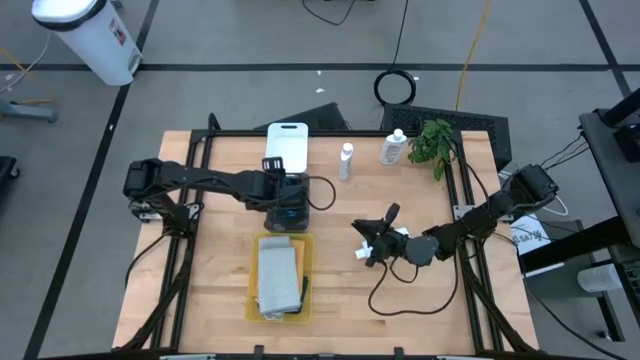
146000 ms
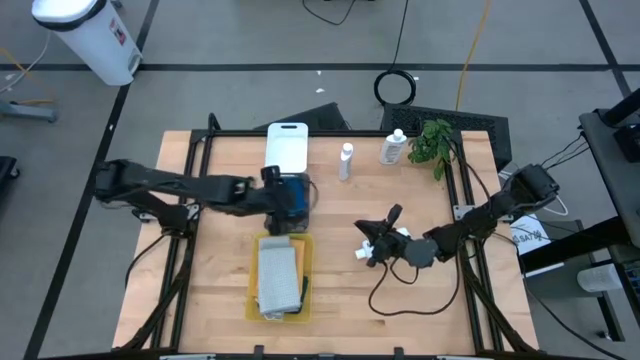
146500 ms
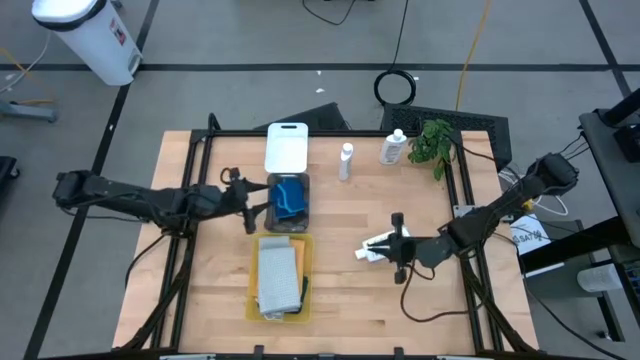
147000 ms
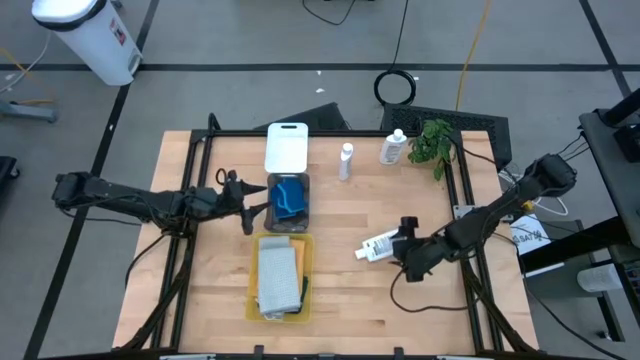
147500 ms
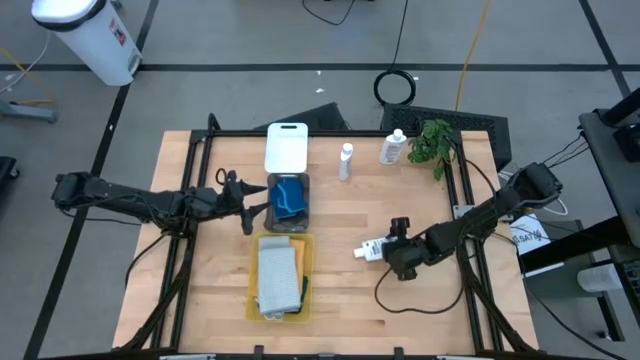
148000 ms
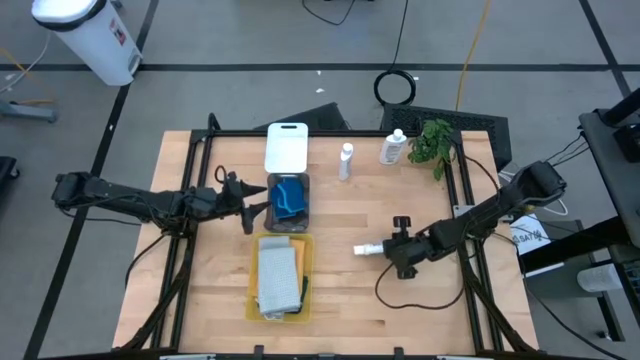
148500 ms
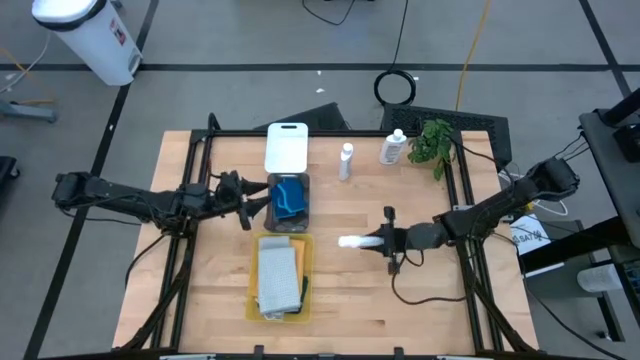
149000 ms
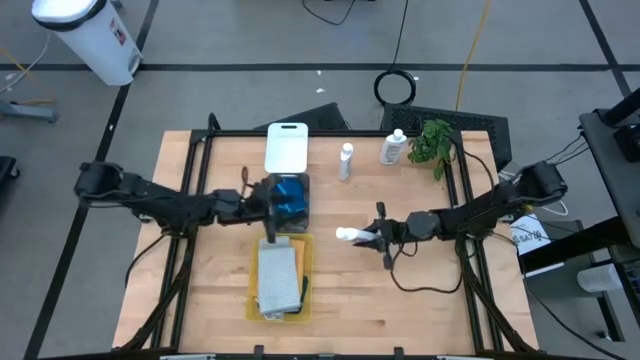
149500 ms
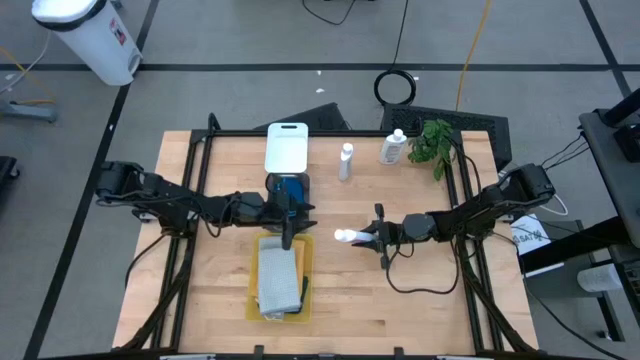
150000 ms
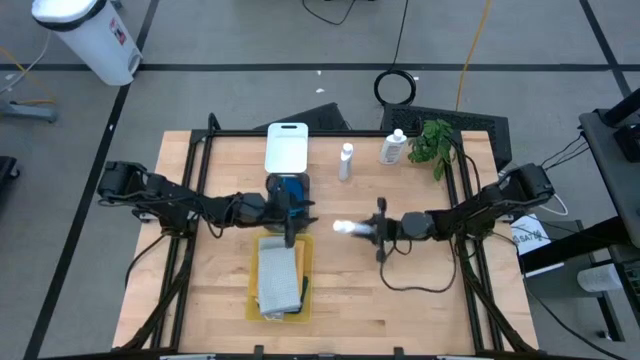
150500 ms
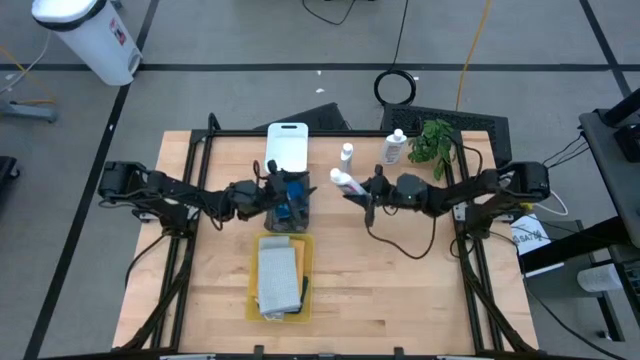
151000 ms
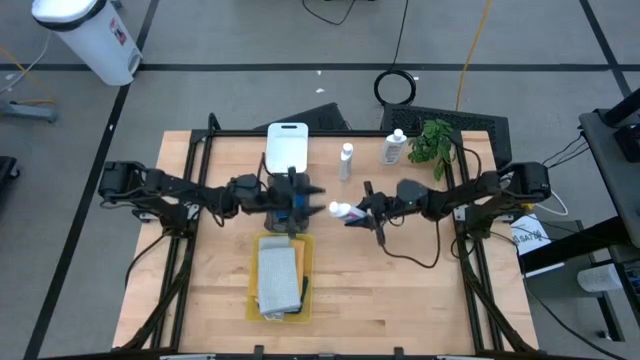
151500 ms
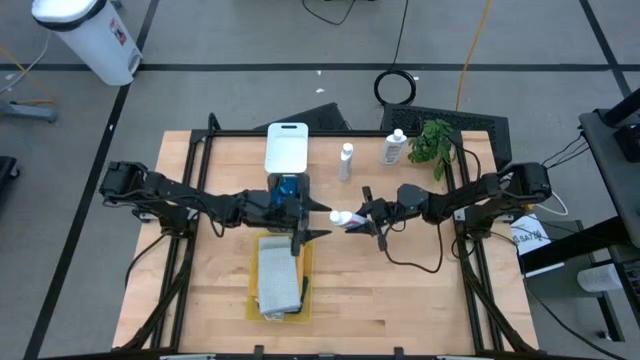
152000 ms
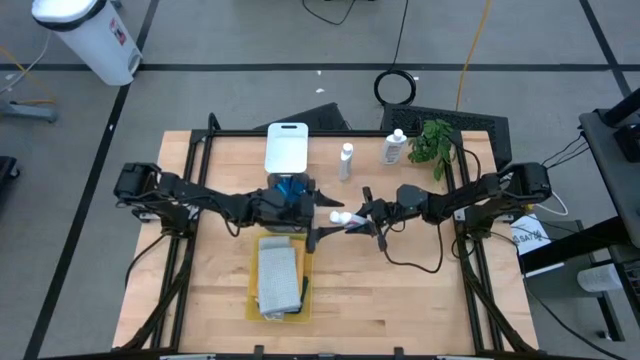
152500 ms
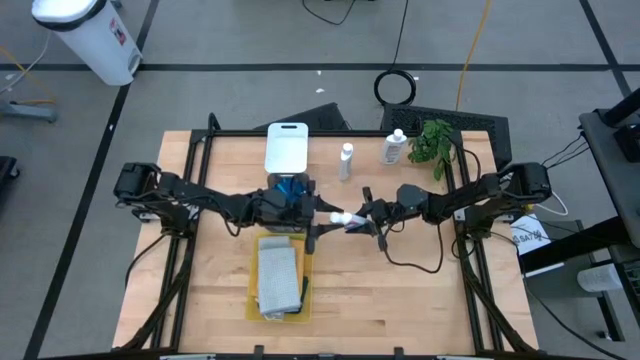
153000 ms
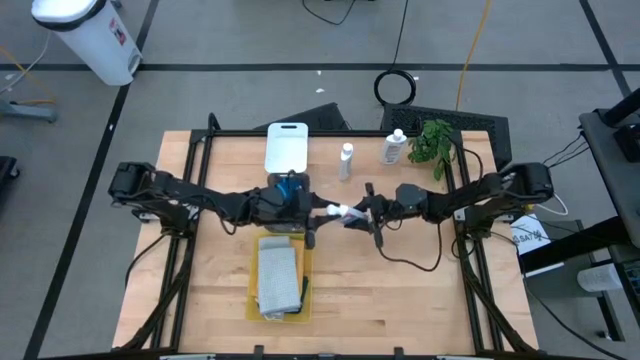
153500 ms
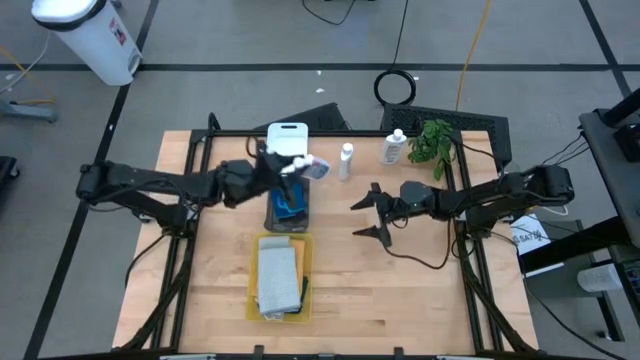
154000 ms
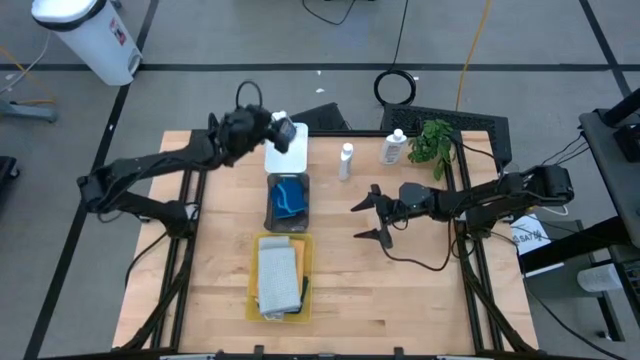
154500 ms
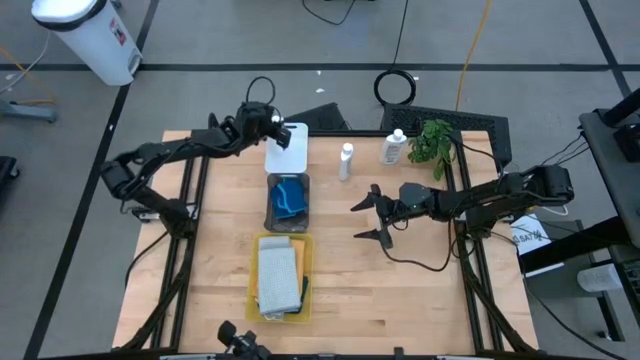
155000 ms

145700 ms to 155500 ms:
Task: Pick & Place Kitchen Items
Put the white plastic restorer bottle into the white bin

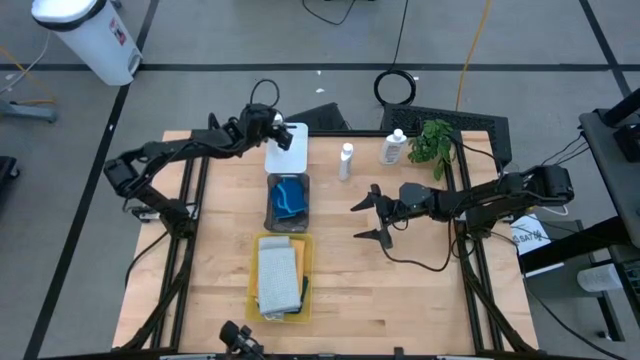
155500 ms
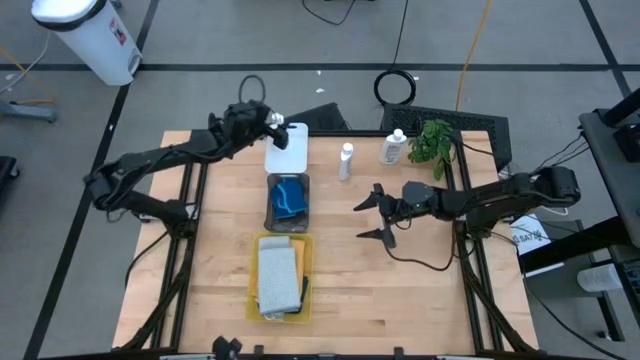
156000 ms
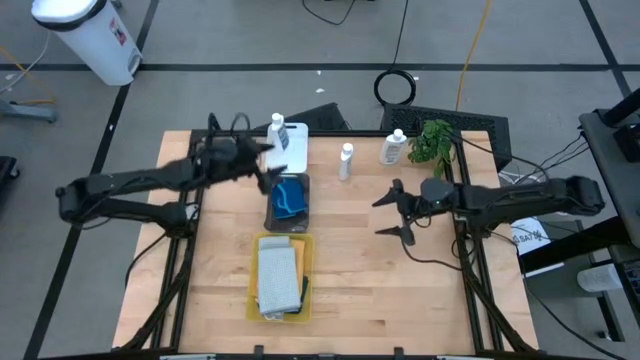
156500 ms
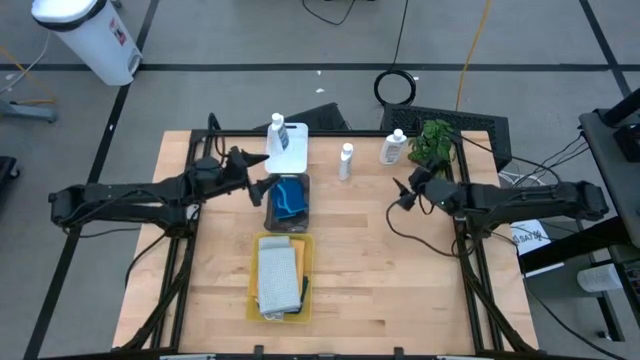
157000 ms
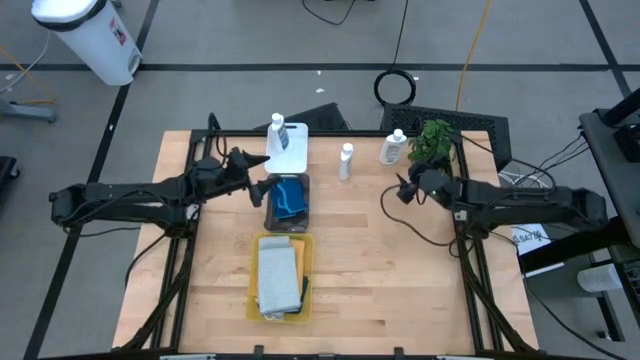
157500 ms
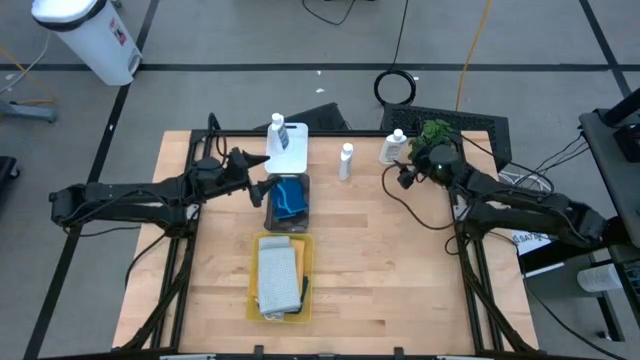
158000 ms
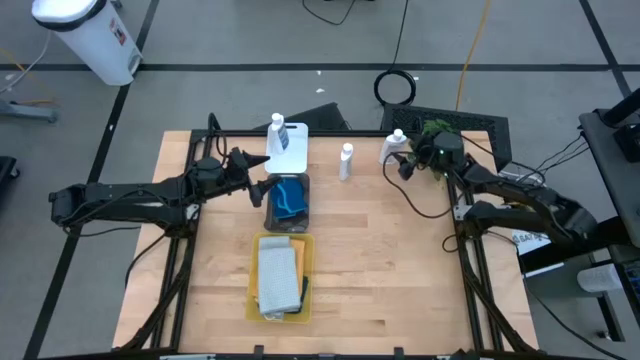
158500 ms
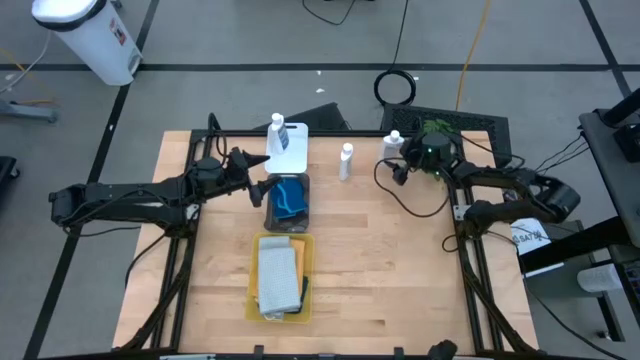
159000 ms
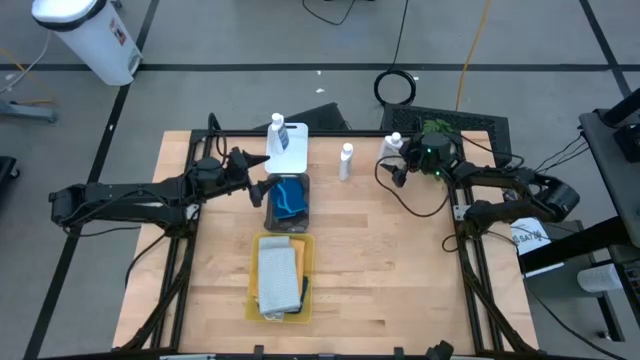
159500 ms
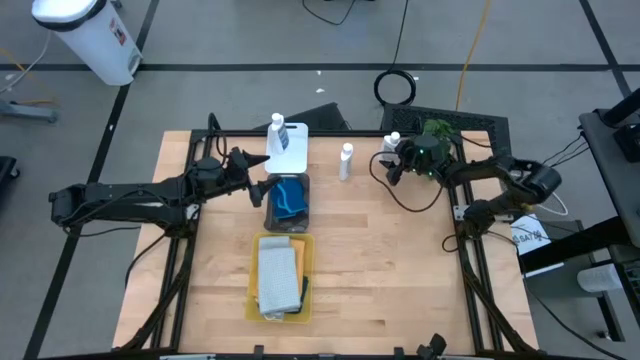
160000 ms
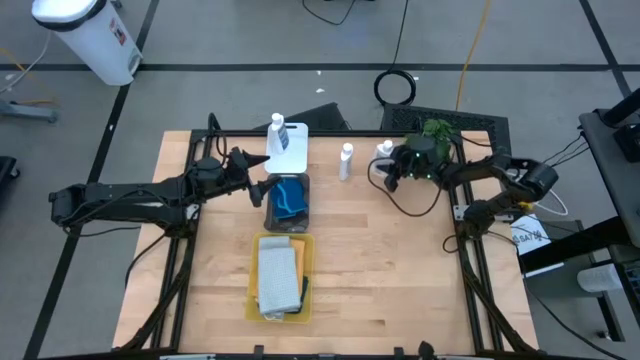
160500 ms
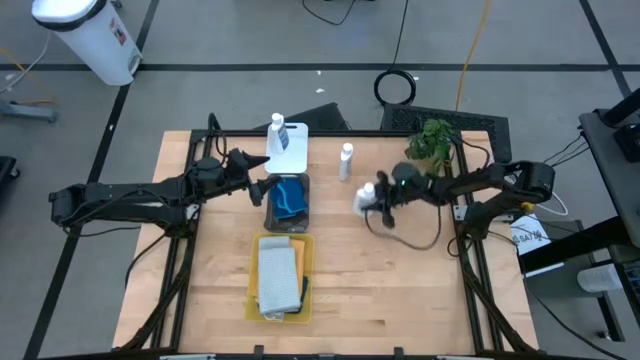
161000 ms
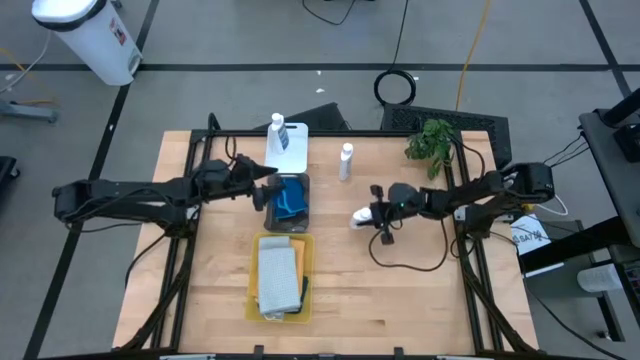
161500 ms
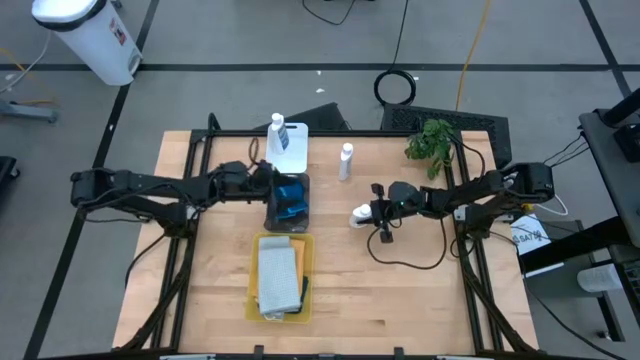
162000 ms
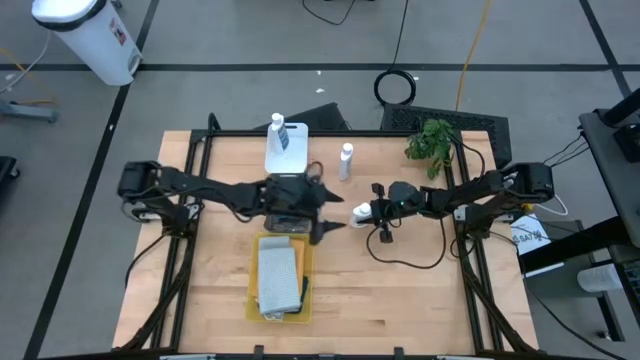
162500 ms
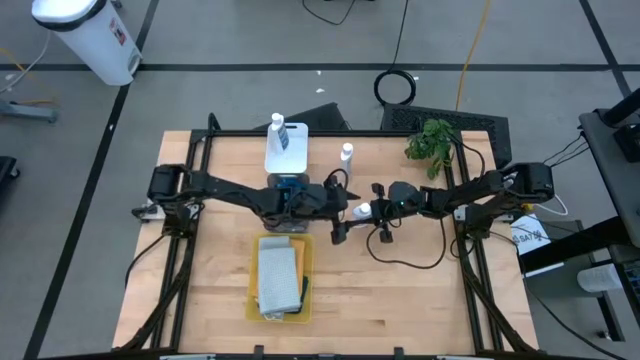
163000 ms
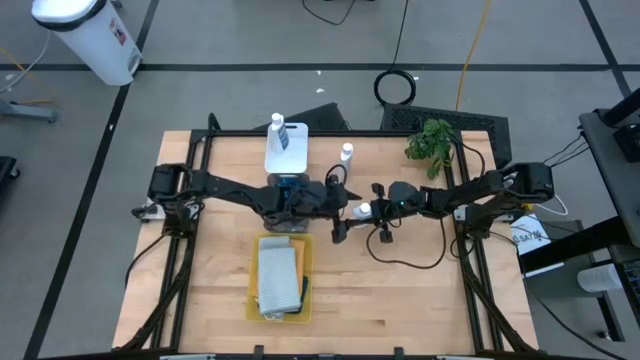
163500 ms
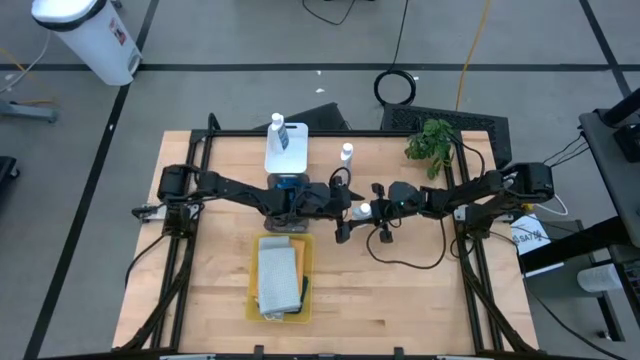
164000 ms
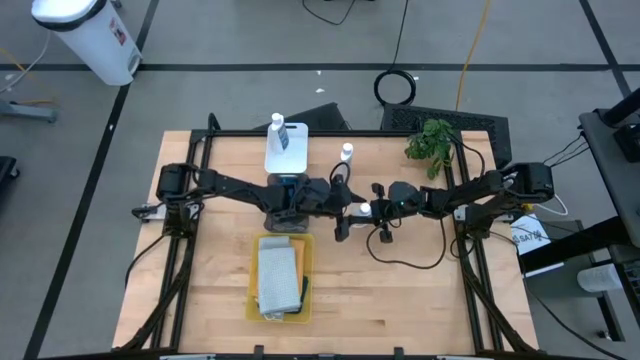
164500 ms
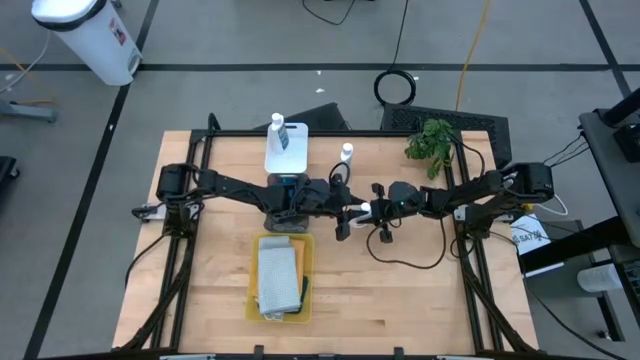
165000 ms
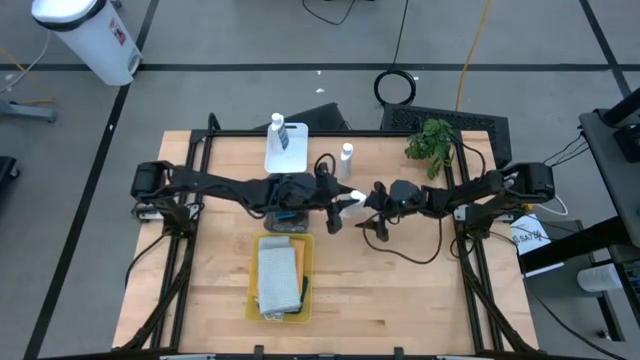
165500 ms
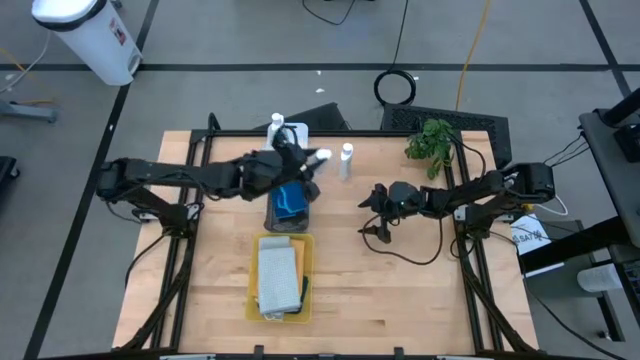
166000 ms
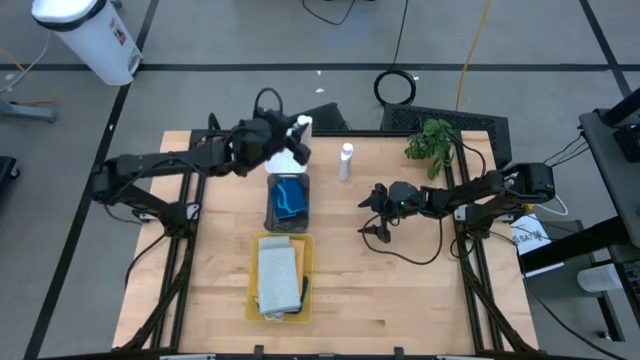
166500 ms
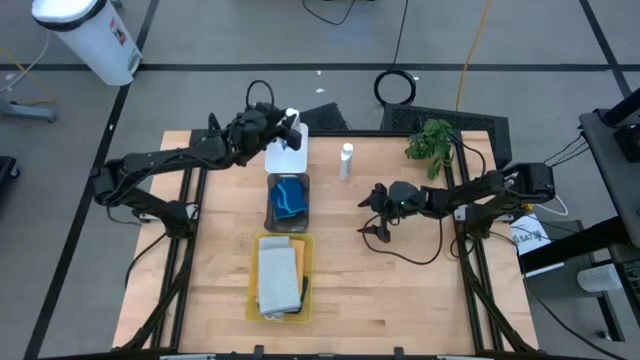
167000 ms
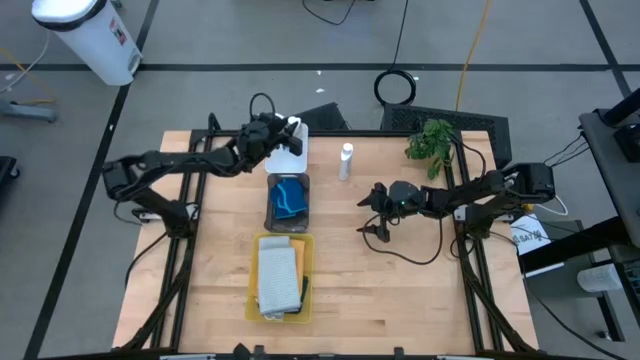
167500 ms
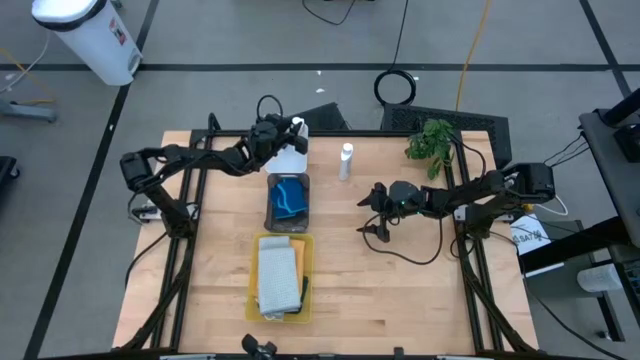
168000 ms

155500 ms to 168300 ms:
Put the white plastic restorer bottle into the white bin
